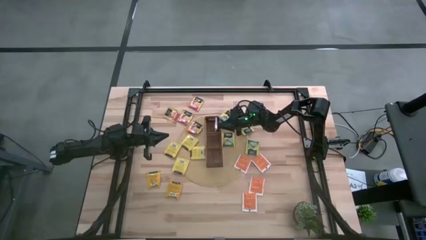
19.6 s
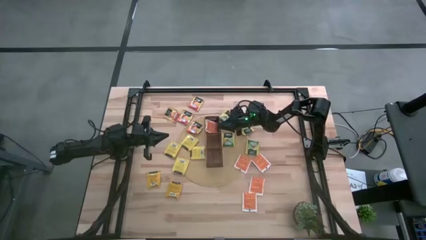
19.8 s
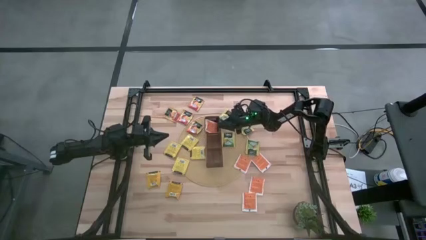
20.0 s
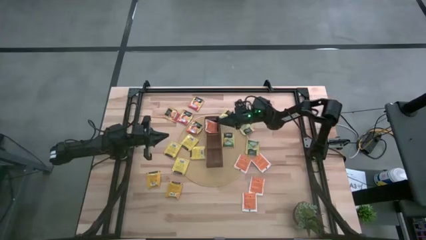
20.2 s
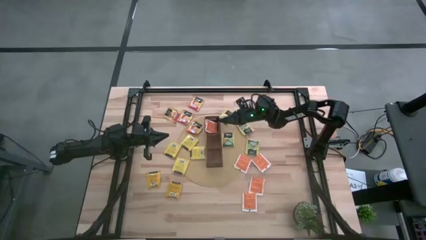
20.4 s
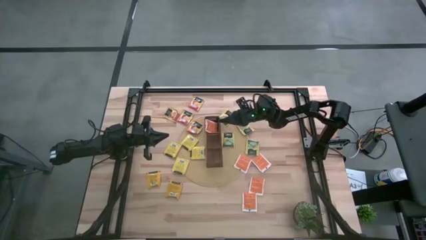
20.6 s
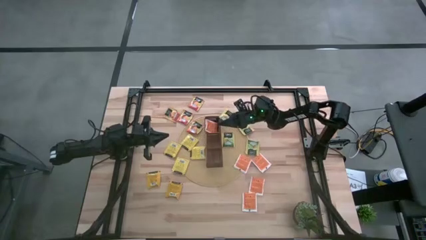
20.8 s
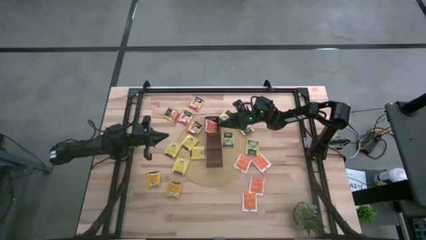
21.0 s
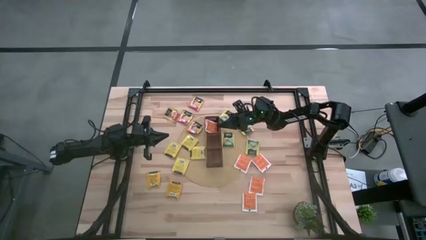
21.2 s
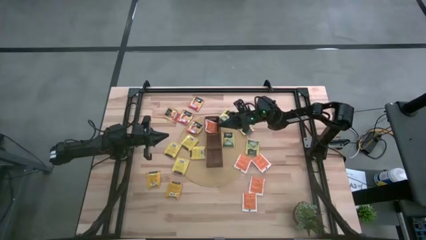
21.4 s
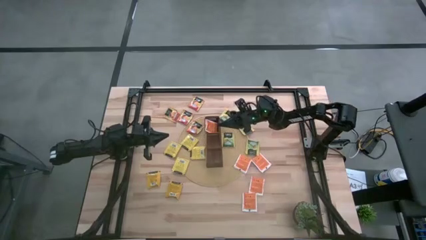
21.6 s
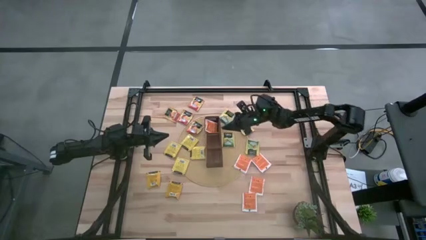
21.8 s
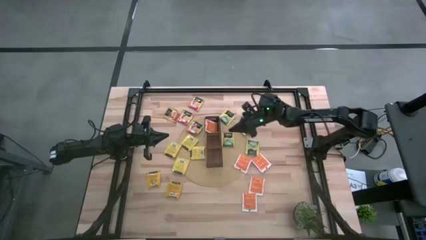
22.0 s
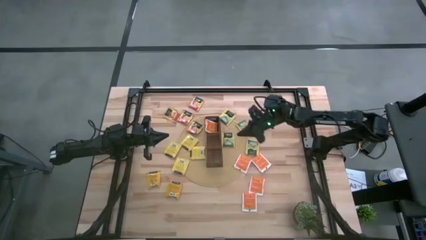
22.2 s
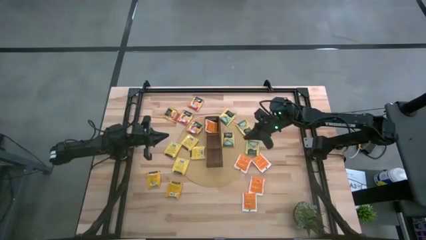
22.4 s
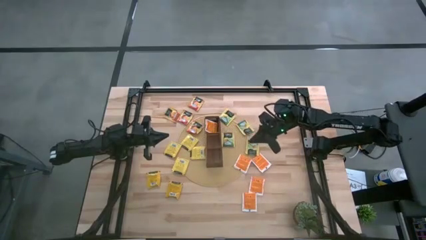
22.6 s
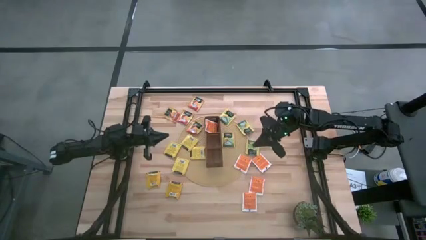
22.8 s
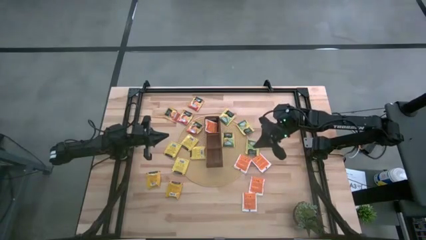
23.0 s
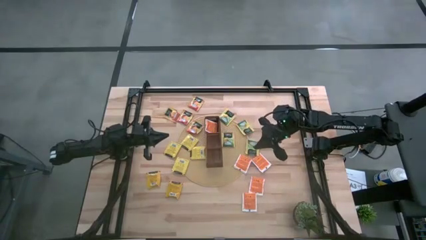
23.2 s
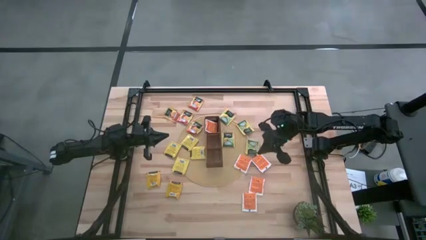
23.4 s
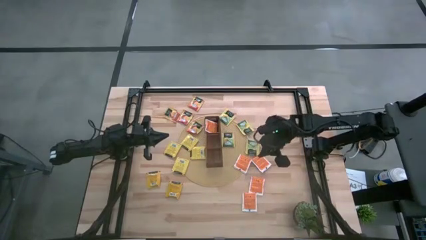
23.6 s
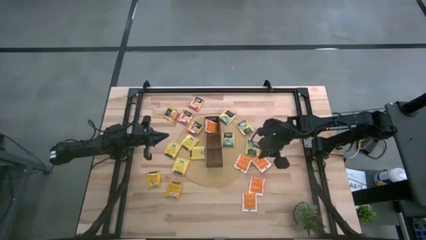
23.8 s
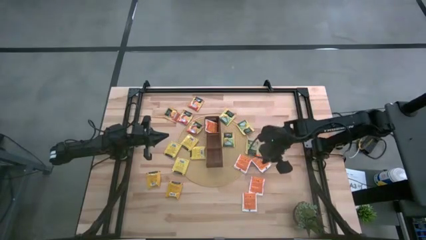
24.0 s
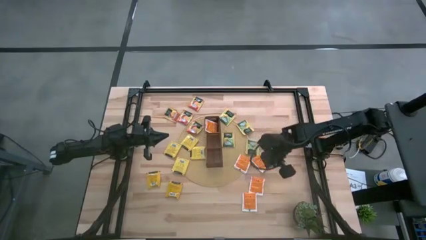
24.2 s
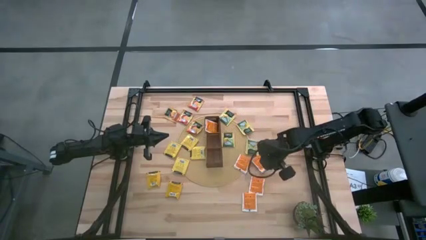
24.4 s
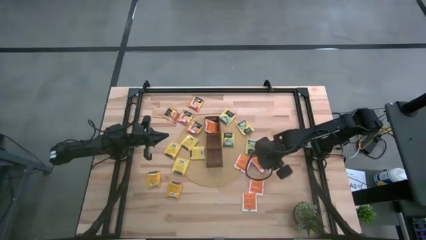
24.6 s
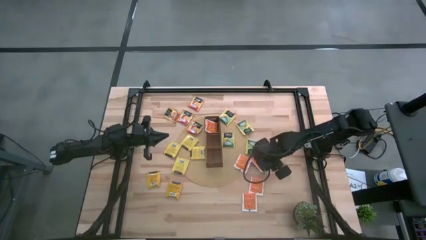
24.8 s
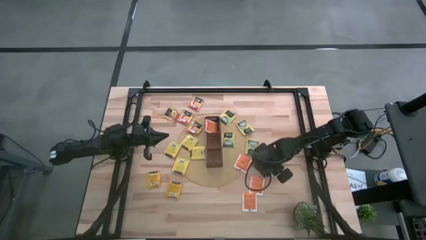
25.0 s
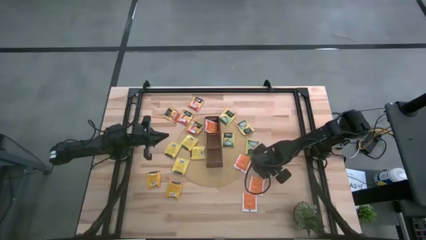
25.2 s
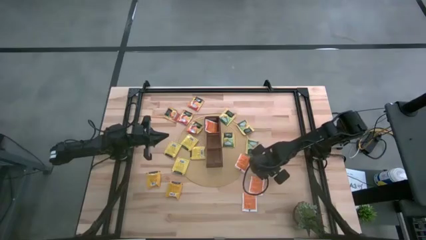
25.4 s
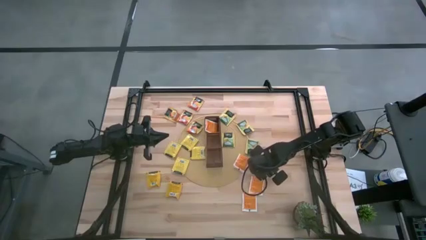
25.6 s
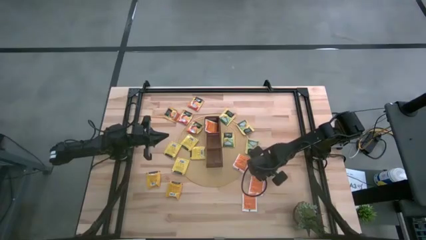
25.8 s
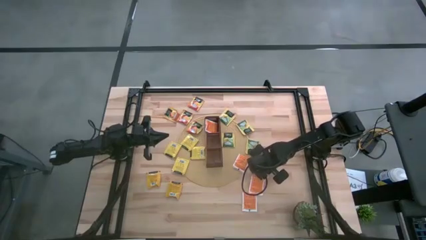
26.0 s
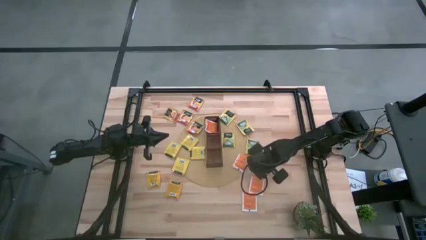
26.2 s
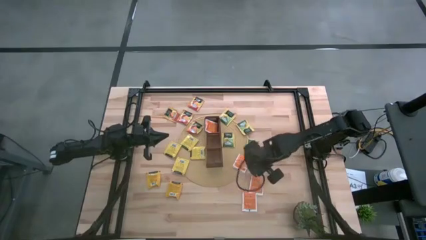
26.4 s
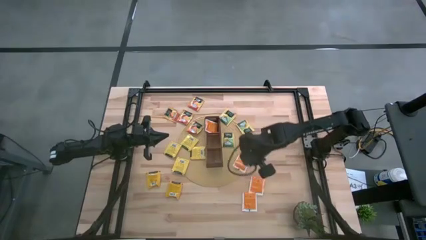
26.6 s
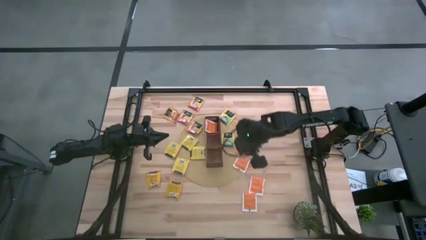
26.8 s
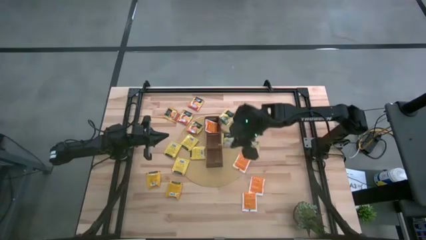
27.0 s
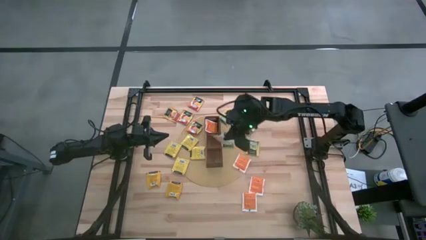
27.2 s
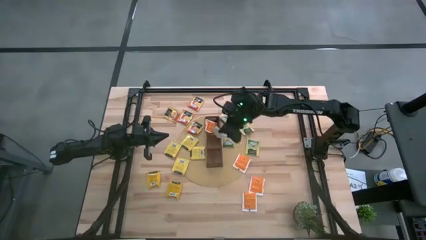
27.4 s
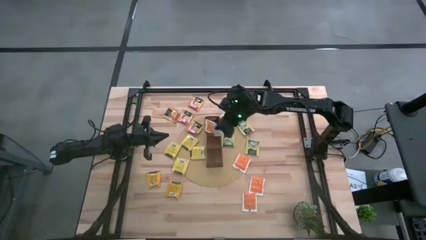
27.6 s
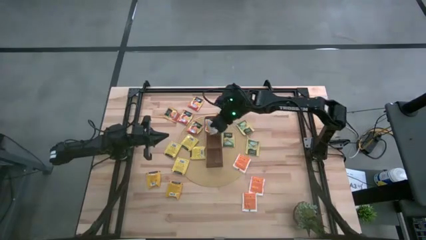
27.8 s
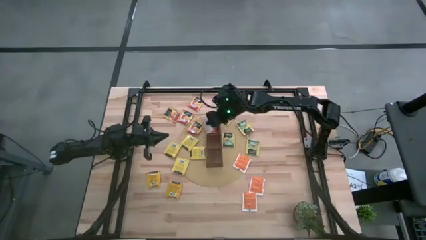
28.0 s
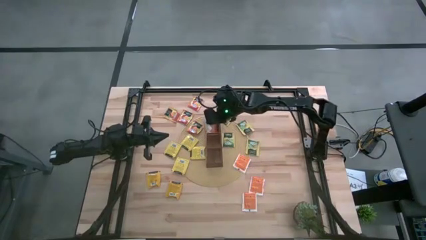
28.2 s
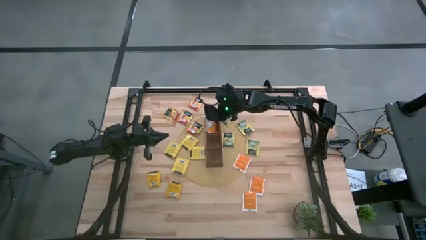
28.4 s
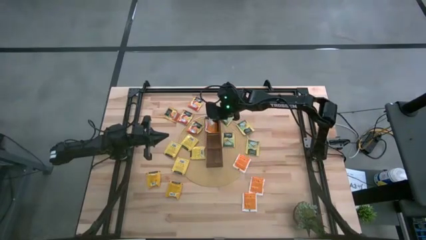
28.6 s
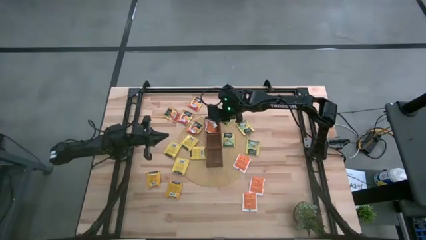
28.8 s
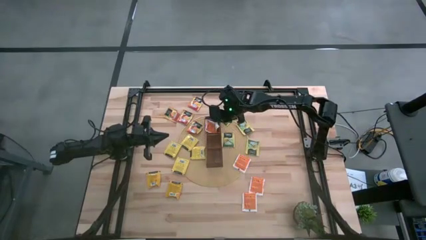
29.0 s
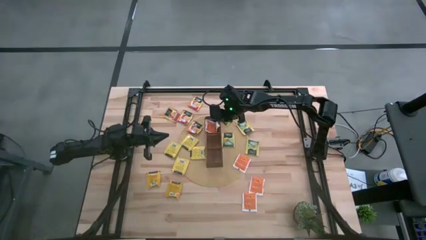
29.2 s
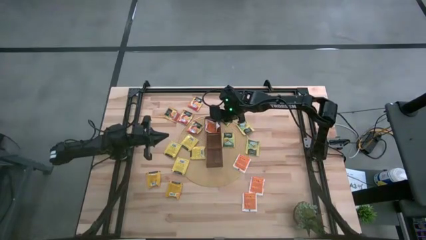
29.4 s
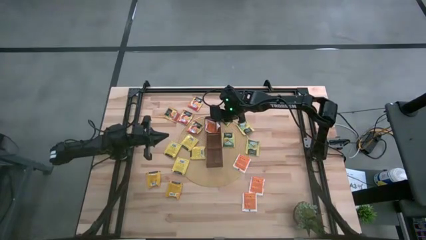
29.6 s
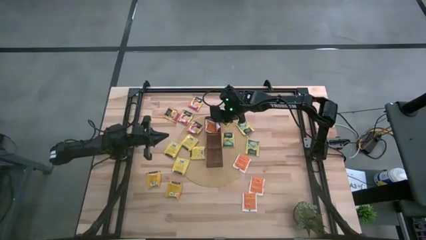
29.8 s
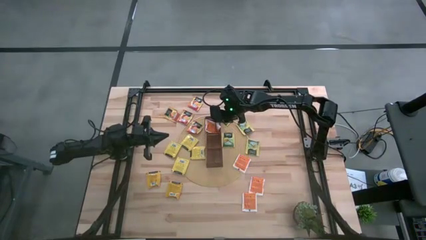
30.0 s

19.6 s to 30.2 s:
Task: Pick & Place Tea
Put the white tea bag into the top section of the wooden organizer

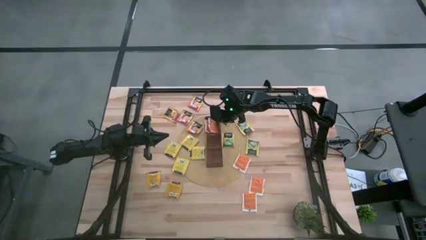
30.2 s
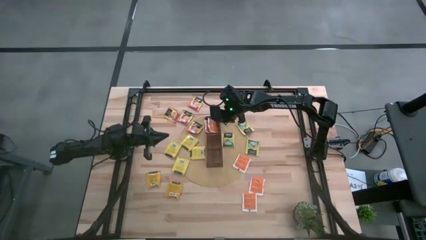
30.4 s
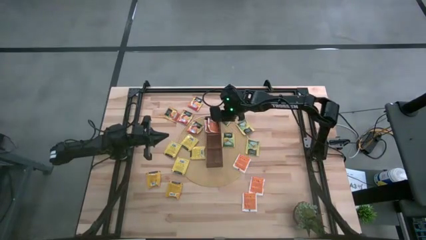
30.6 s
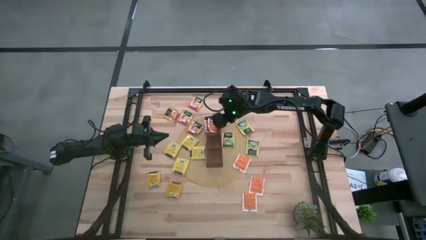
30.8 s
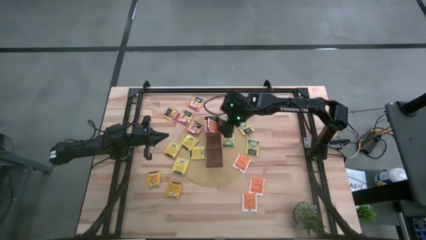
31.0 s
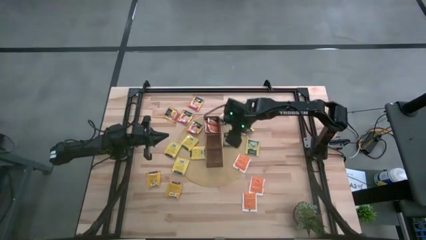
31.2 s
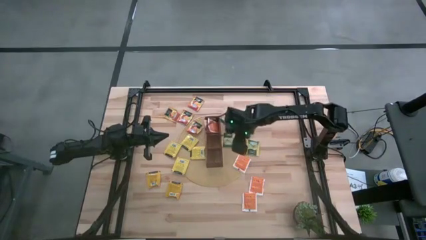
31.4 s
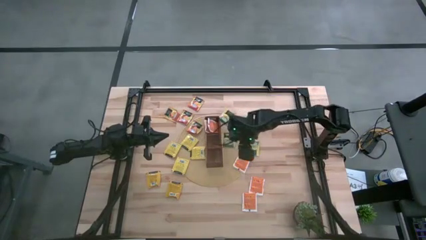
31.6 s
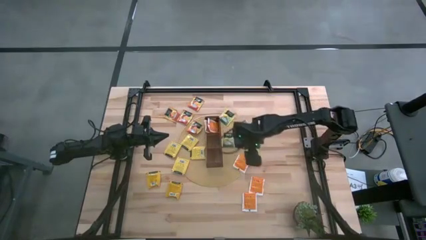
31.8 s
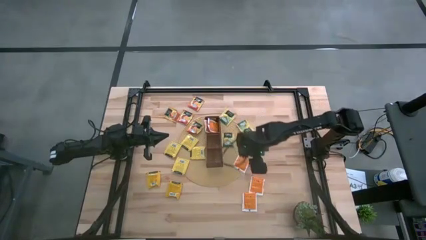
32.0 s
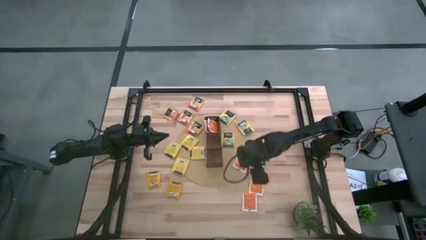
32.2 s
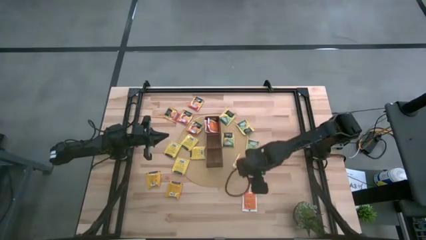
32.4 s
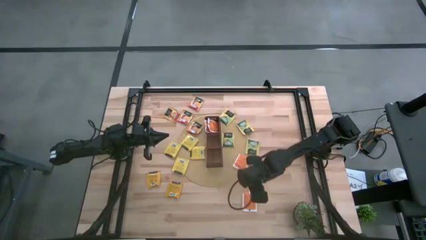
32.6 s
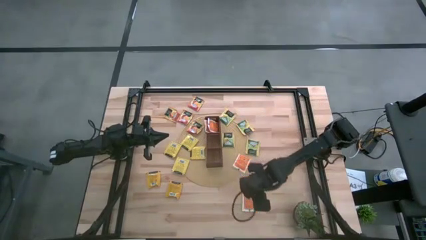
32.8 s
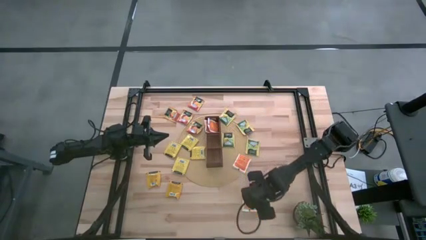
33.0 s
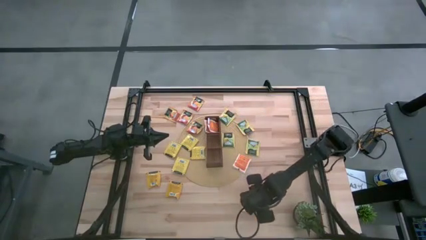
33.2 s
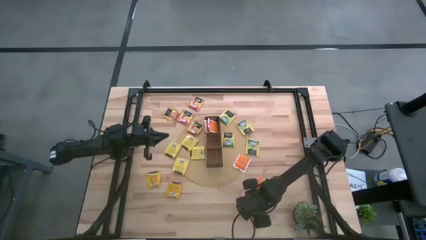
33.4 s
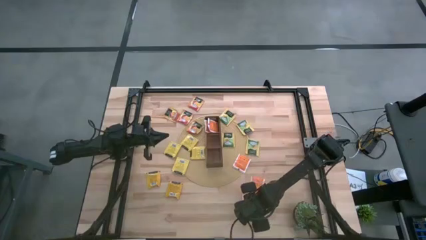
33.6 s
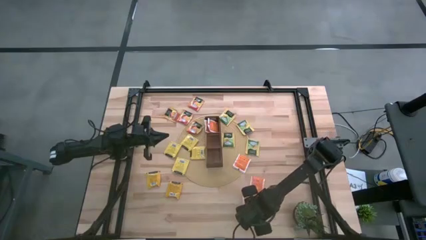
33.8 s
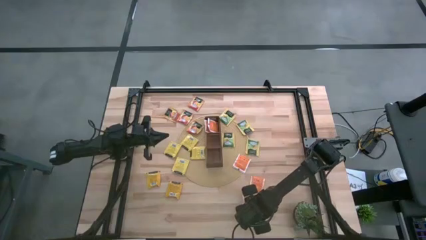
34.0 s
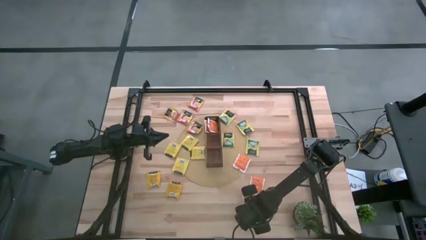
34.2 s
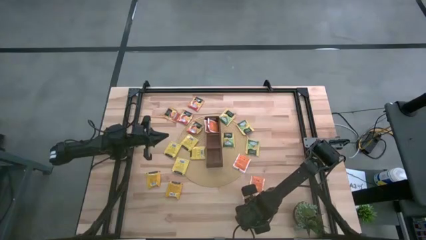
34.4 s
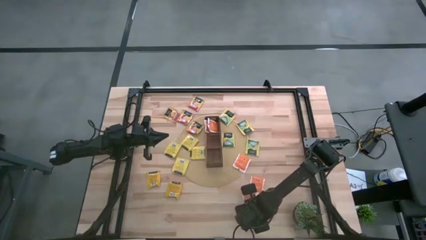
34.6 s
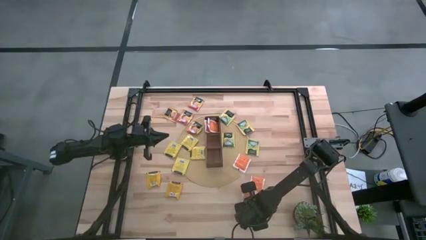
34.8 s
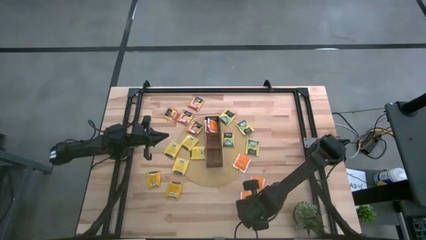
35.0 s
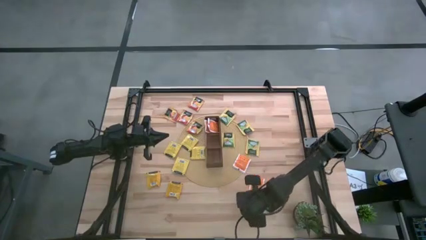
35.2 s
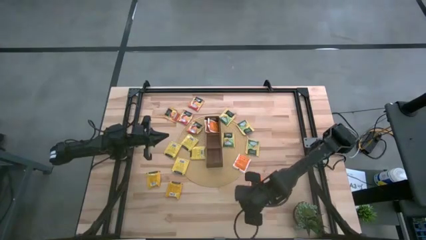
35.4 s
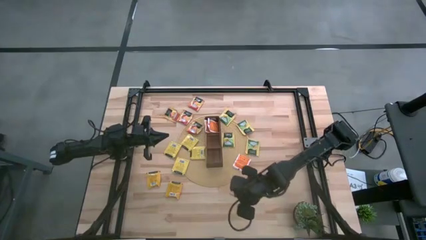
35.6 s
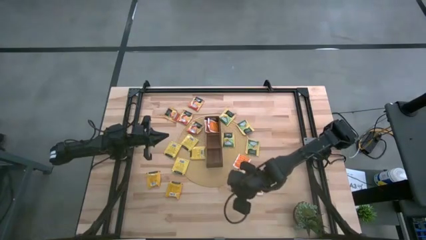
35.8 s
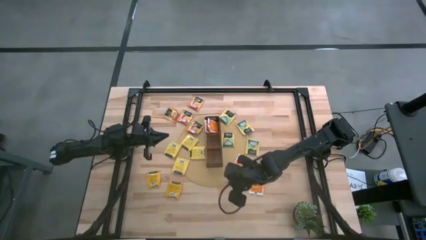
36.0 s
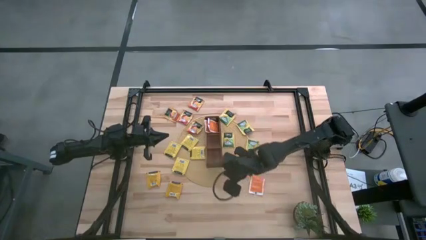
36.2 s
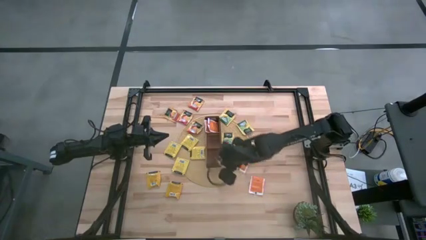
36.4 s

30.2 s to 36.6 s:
Put the bottom white tea bag into the top section of the wooden organizer
